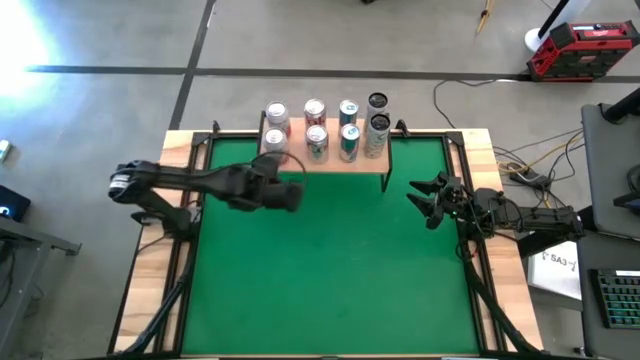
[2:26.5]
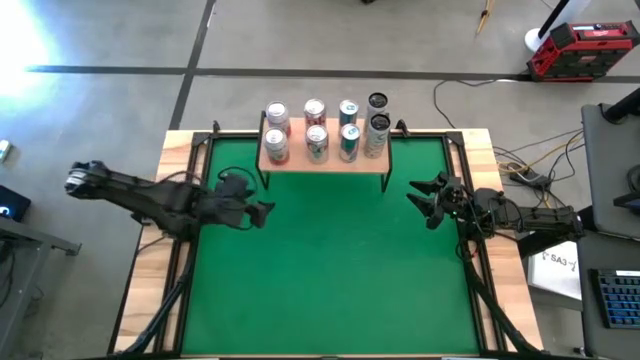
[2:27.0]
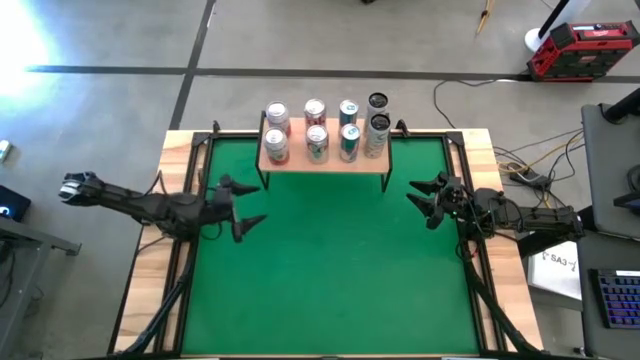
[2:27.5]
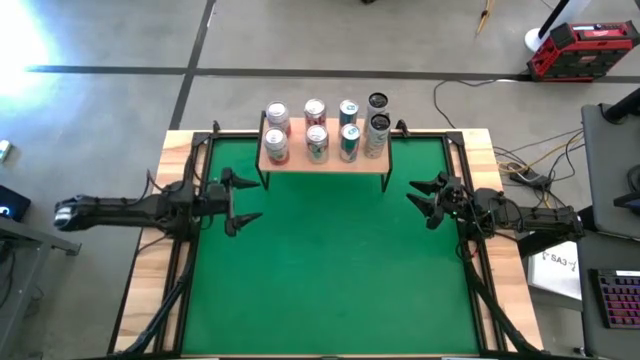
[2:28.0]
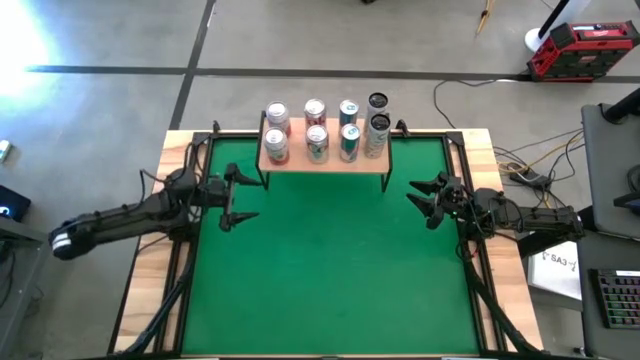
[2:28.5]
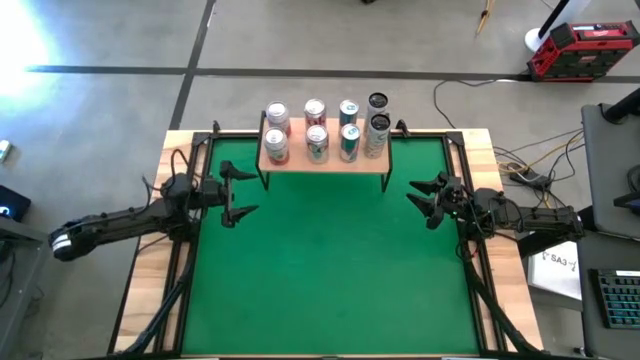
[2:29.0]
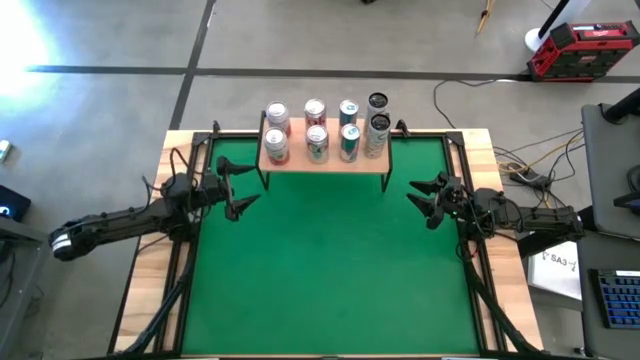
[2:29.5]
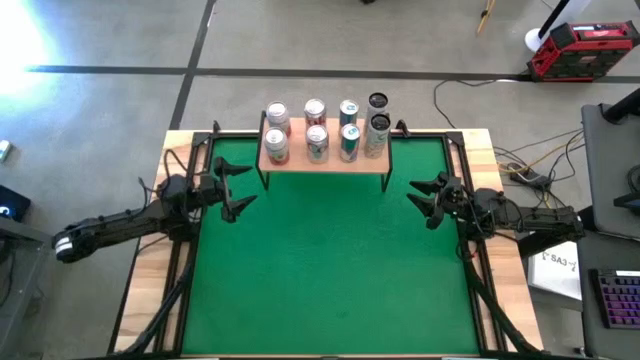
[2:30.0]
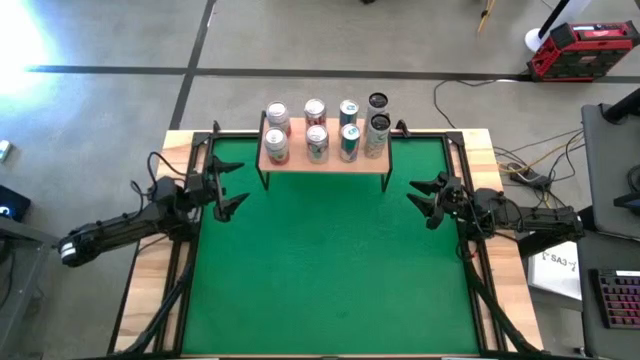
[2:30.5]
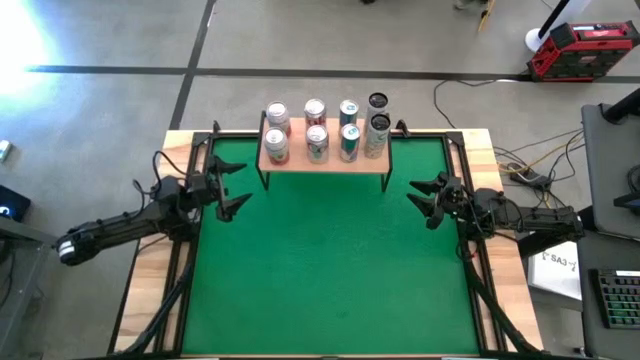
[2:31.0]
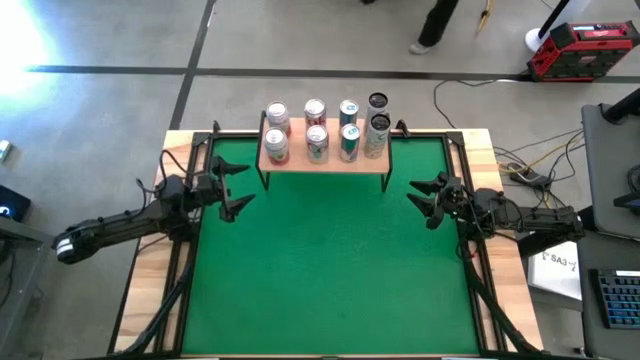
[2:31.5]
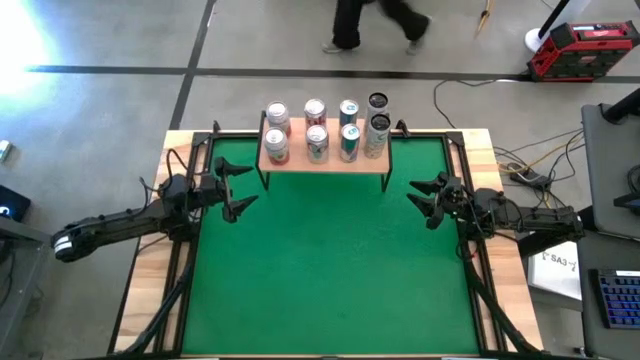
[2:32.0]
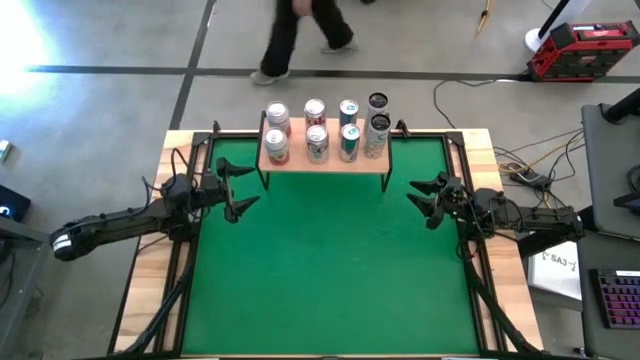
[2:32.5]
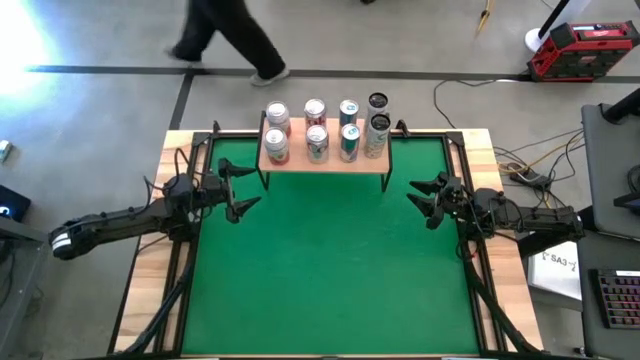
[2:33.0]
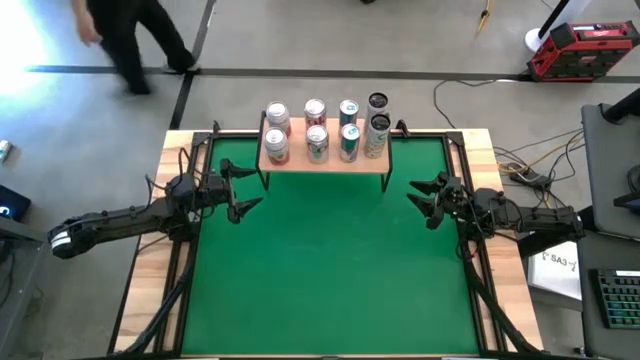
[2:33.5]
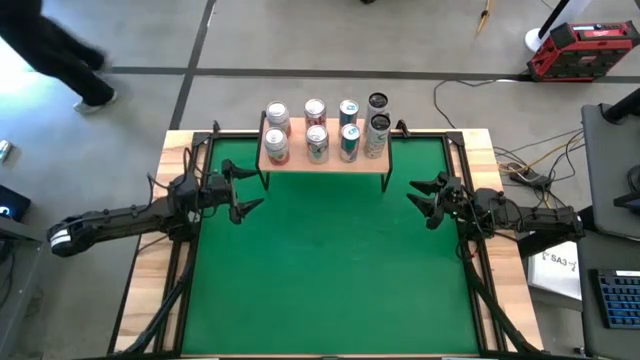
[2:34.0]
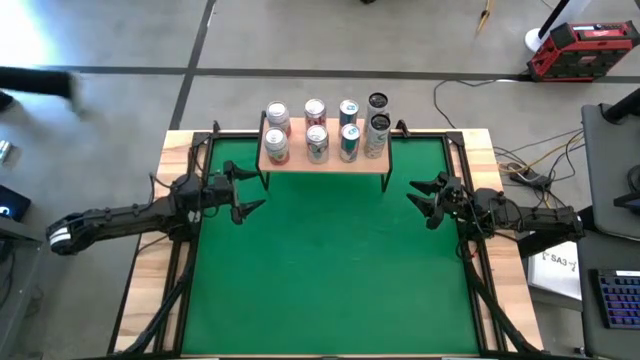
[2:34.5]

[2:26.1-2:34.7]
Task: Place canned beverage on shelf
Return to Home Position

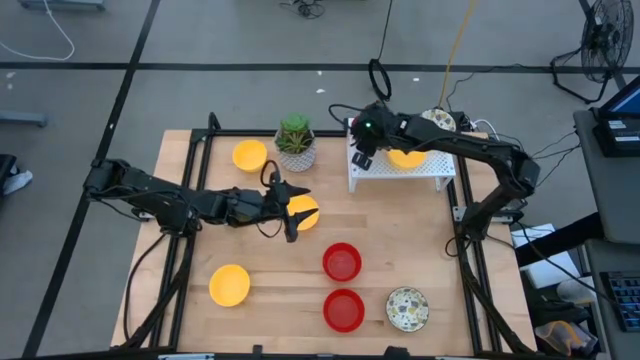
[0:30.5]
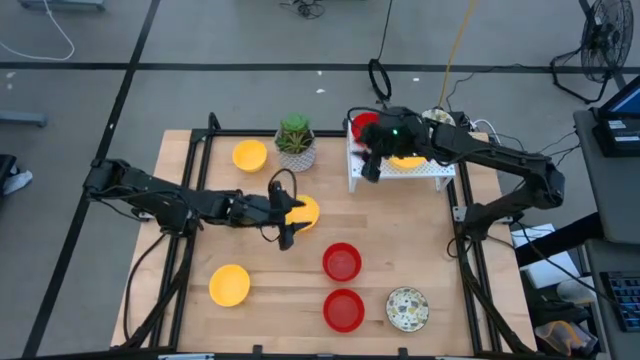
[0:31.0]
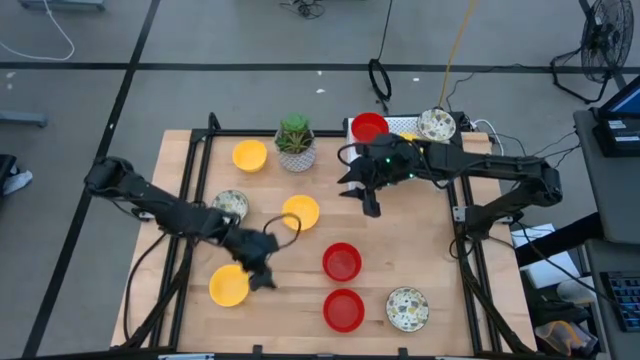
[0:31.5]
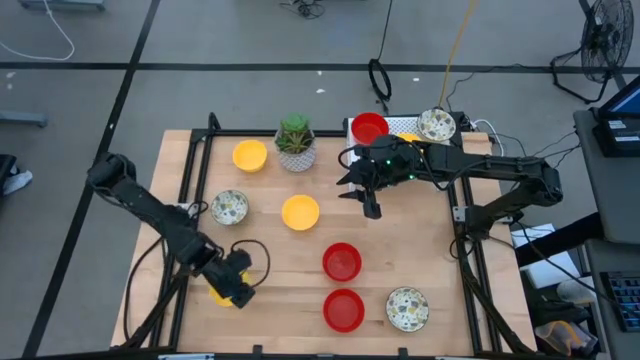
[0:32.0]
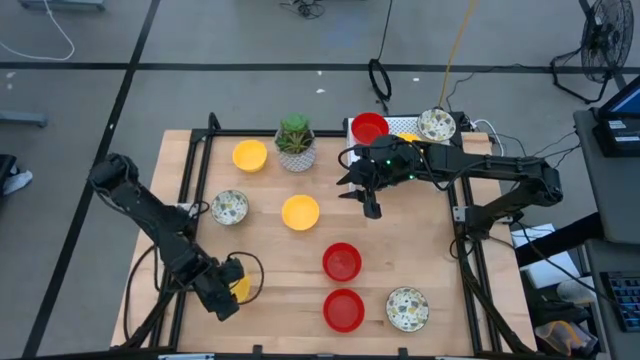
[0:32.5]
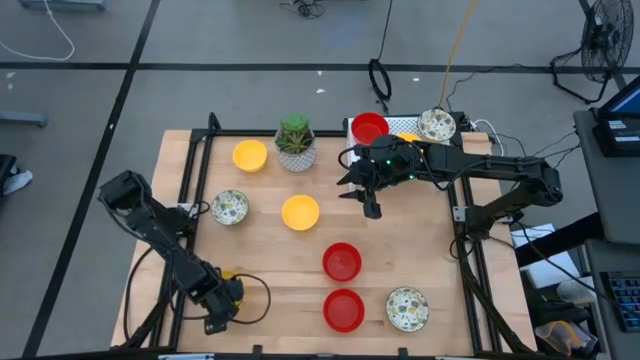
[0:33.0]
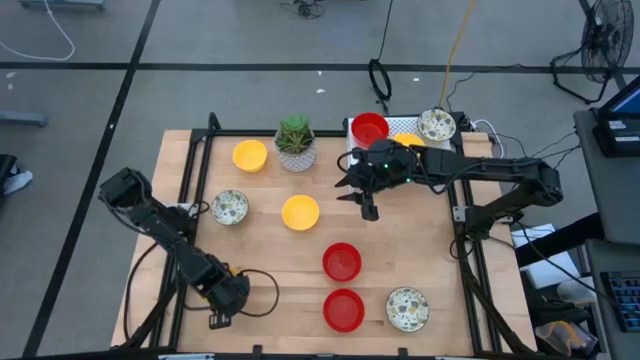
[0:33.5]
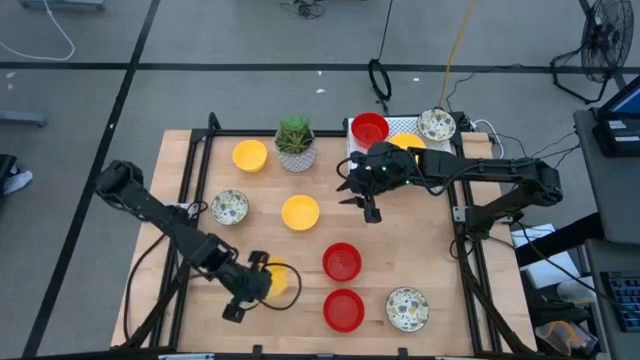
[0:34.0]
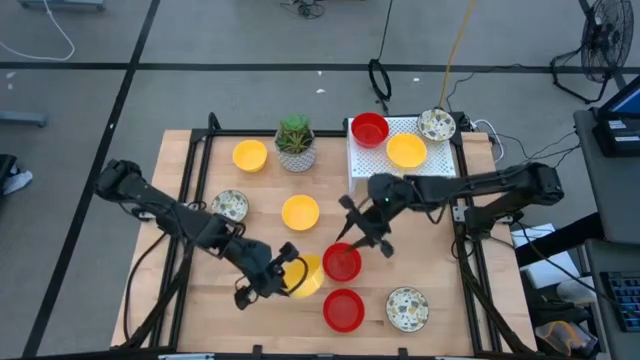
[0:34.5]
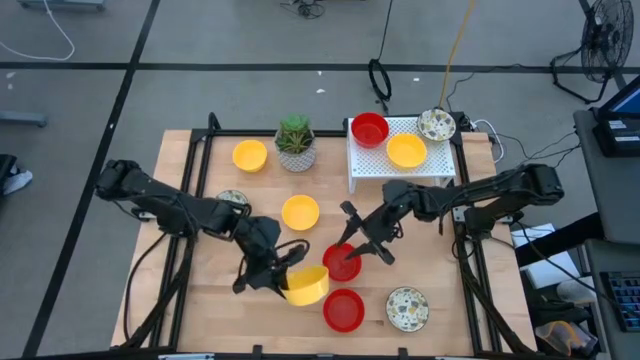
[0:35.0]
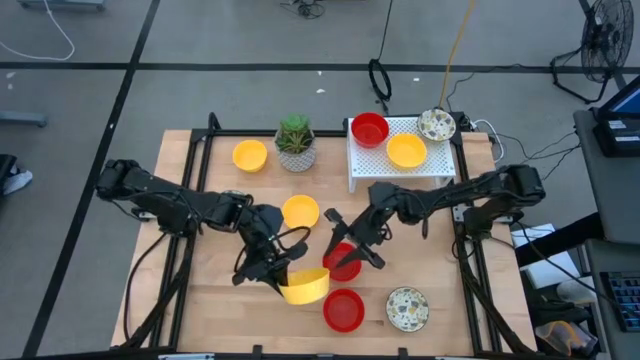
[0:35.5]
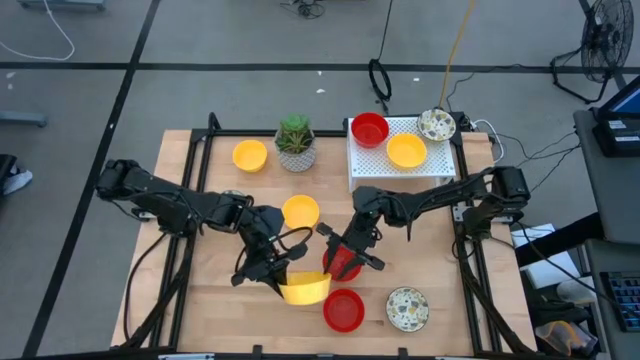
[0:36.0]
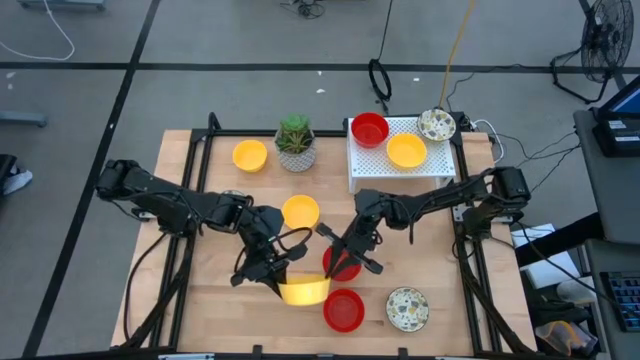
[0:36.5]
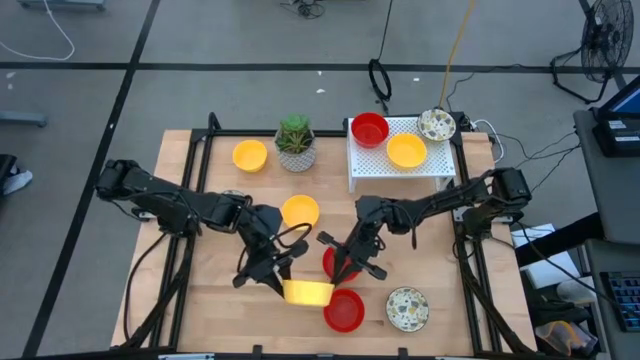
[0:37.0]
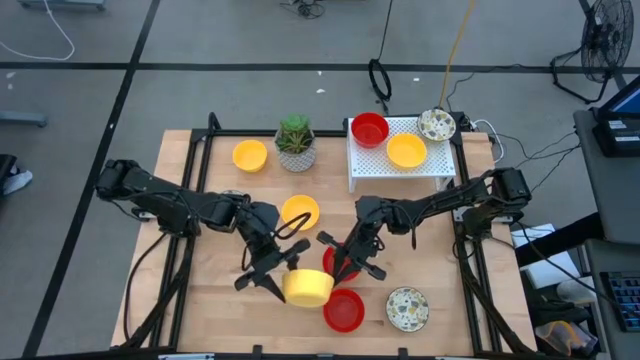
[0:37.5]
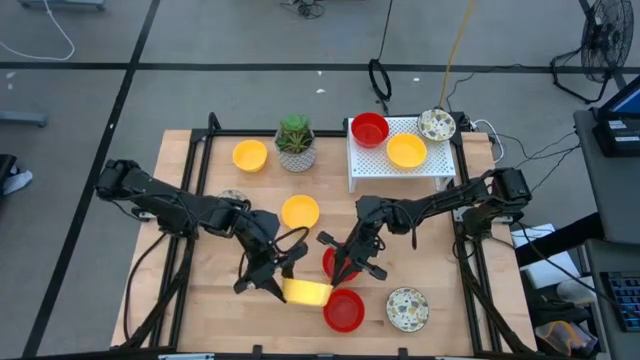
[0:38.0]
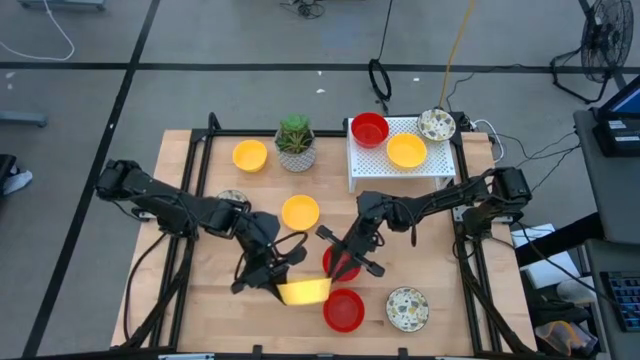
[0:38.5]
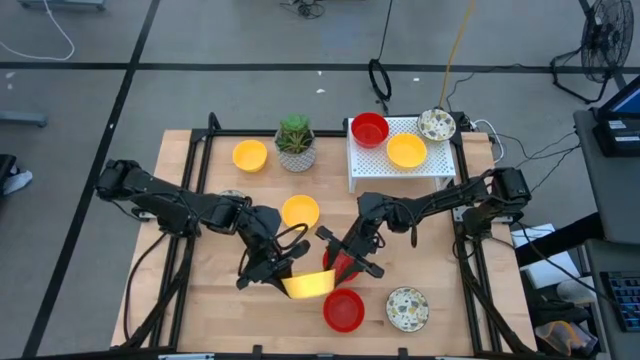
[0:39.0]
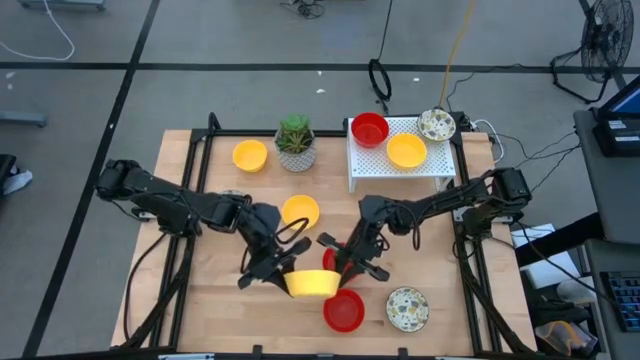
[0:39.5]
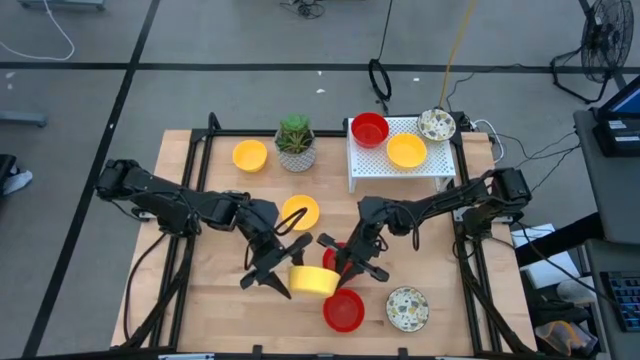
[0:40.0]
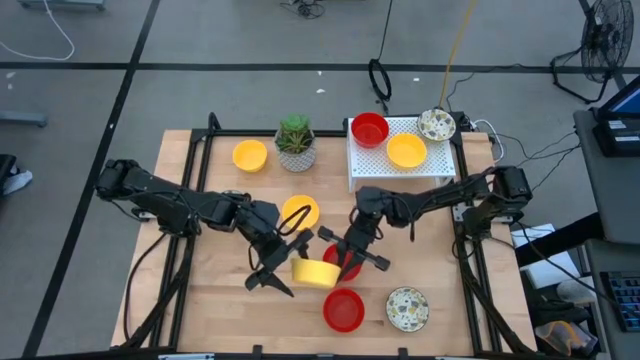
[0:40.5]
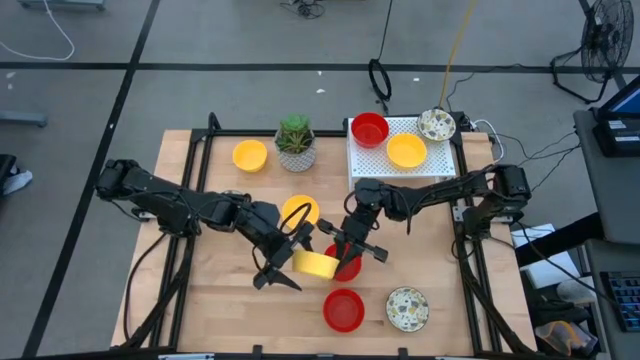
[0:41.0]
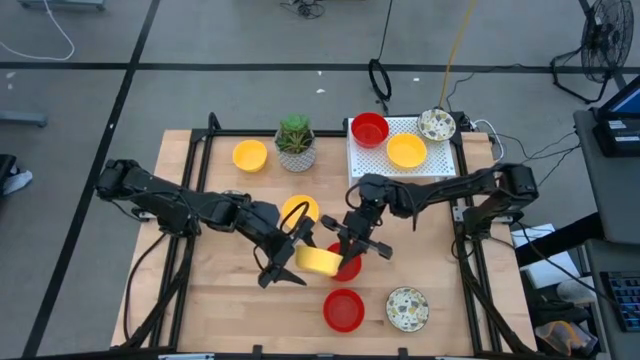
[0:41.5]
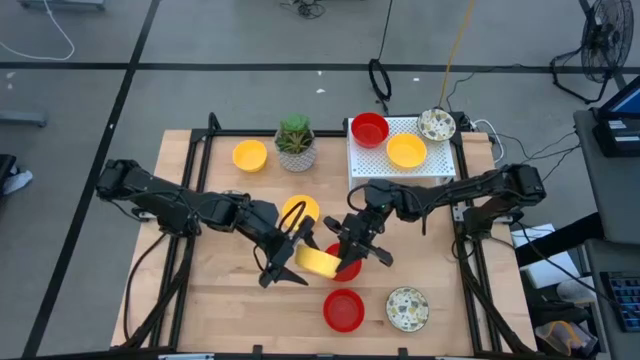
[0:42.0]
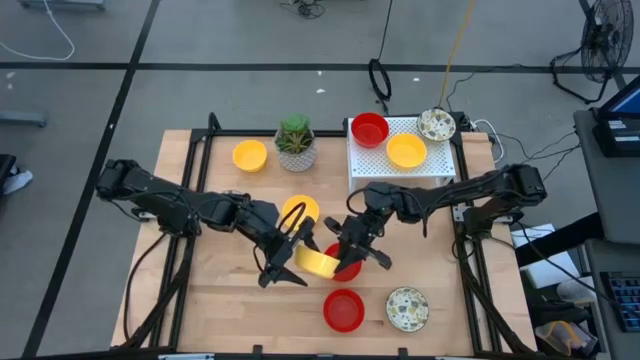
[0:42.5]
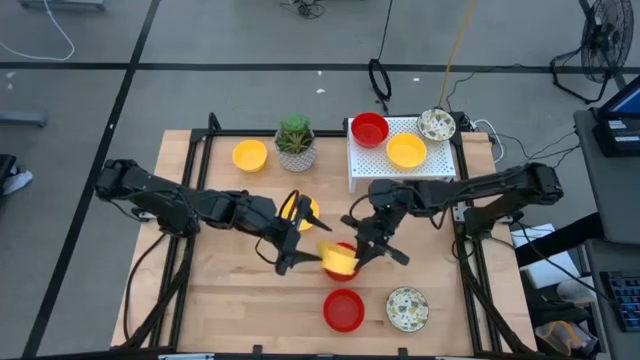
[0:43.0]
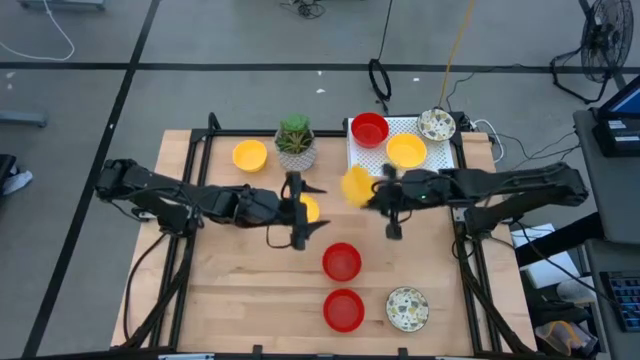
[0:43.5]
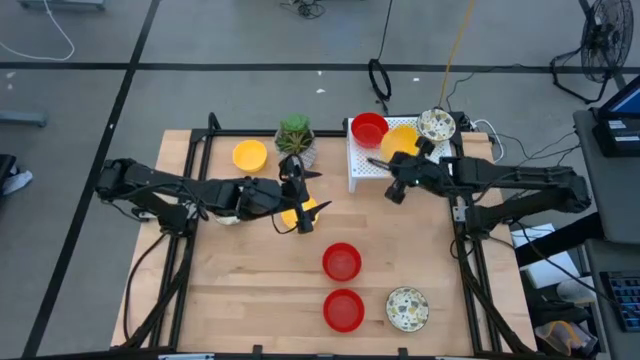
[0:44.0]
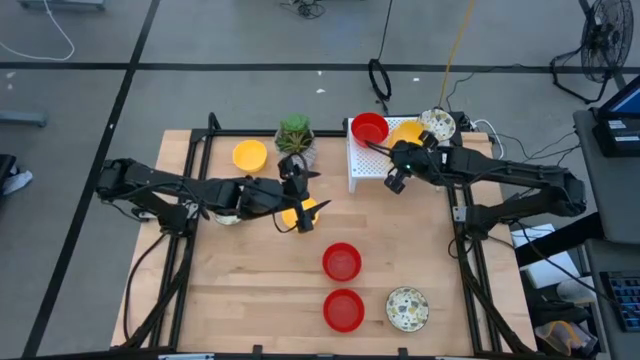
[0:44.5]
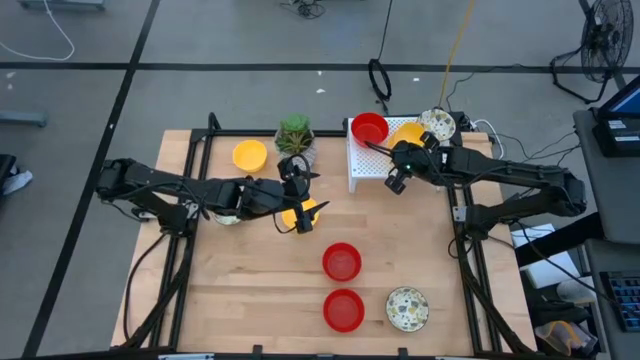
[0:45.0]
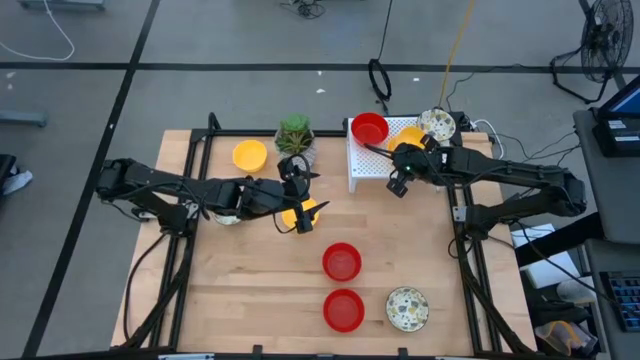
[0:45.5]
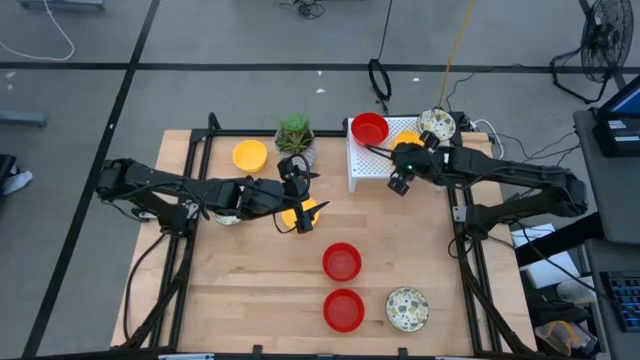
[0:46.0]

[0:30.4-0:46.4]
Task: Pick & Place Mini bowls
Stack the yellow bowl on top of the other yellow bowl on the shelf
